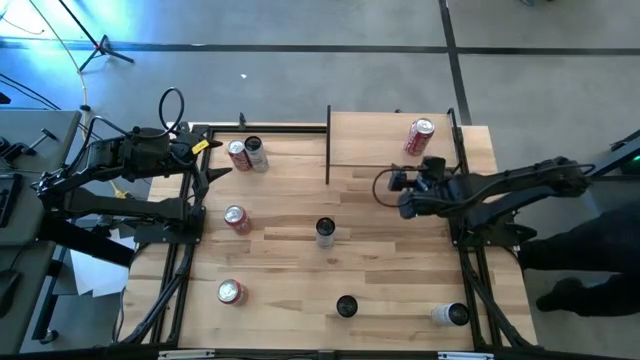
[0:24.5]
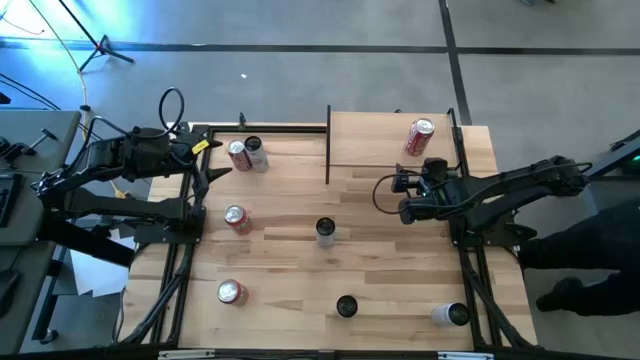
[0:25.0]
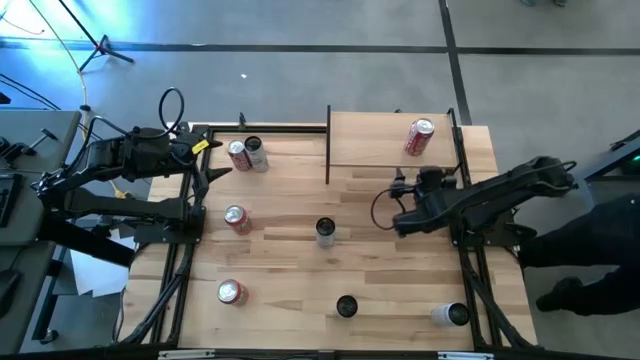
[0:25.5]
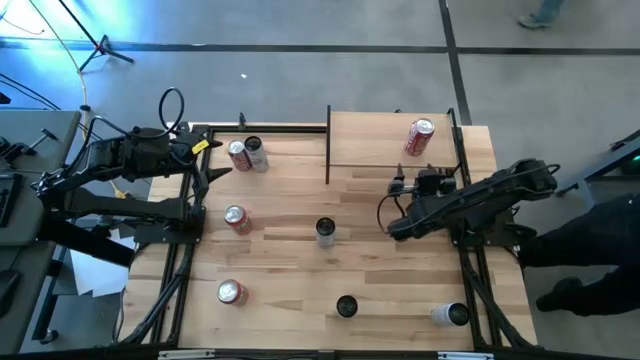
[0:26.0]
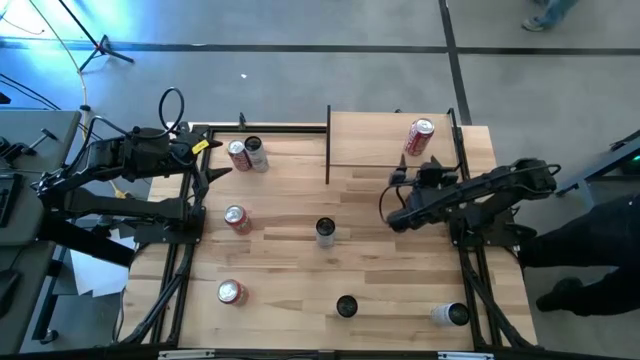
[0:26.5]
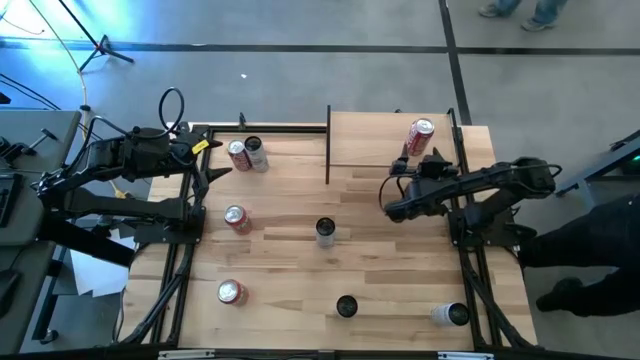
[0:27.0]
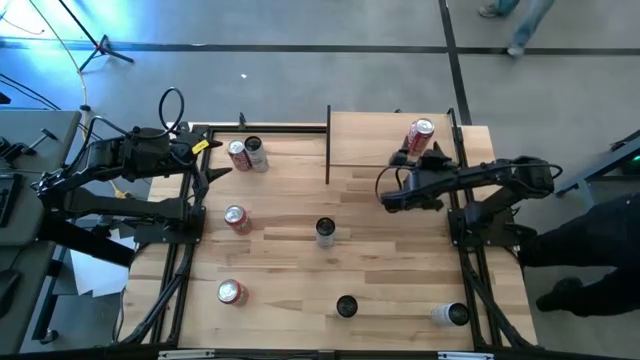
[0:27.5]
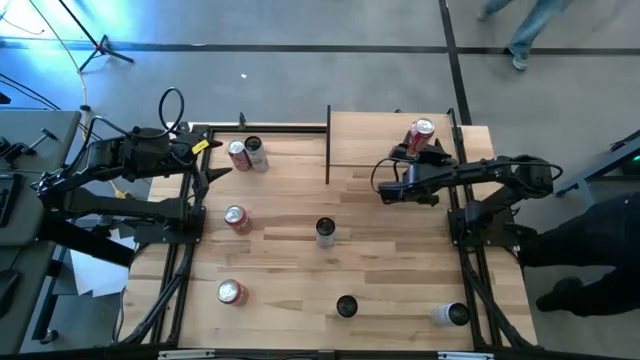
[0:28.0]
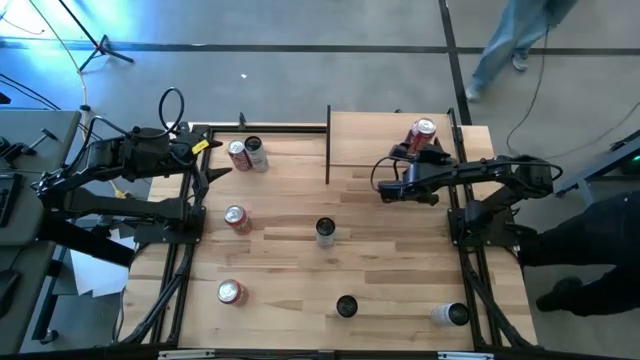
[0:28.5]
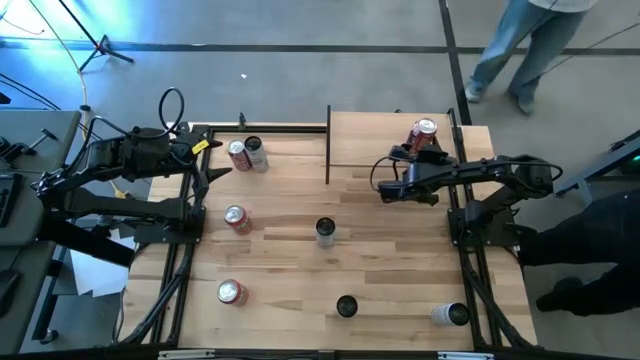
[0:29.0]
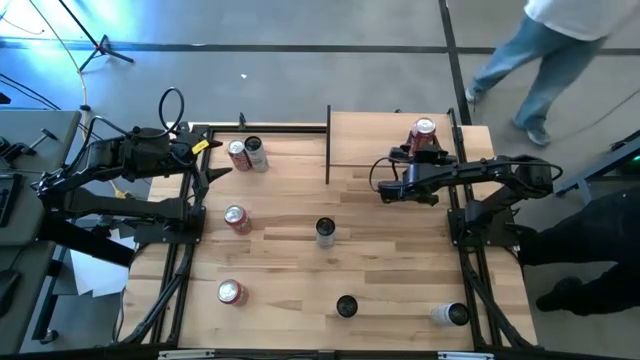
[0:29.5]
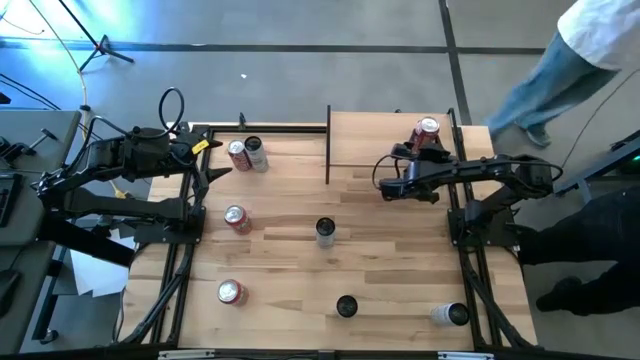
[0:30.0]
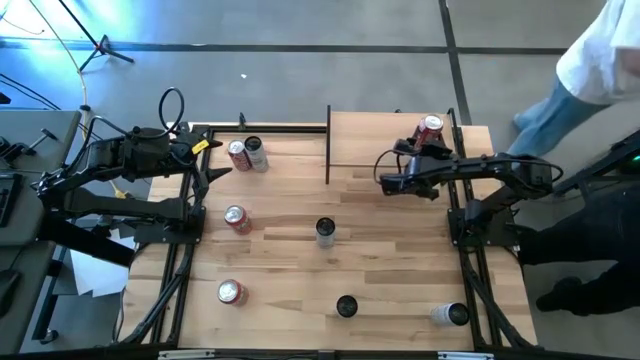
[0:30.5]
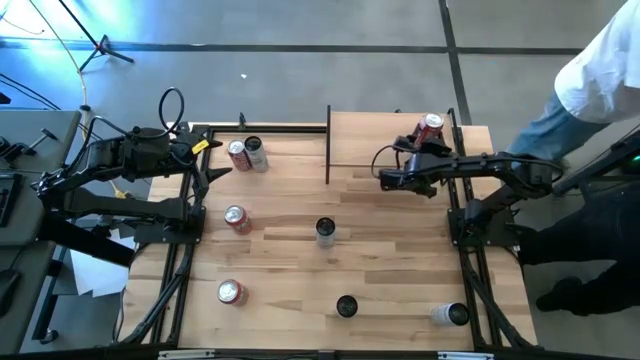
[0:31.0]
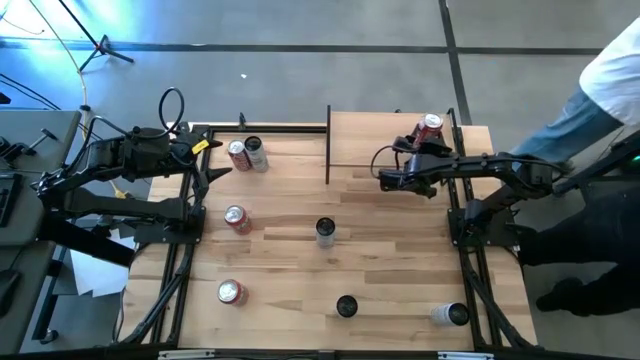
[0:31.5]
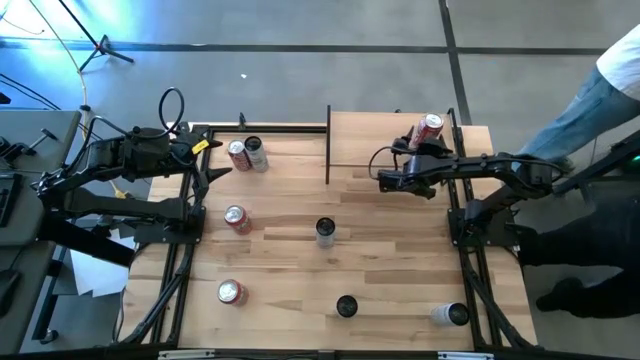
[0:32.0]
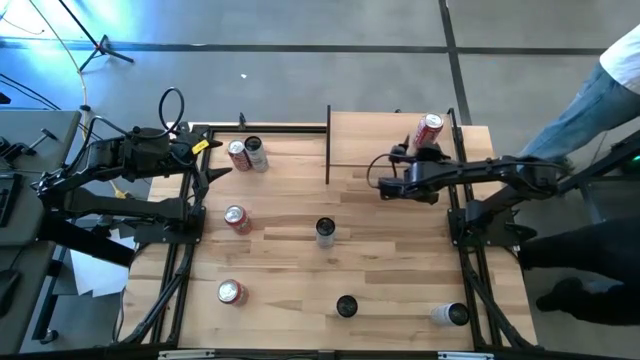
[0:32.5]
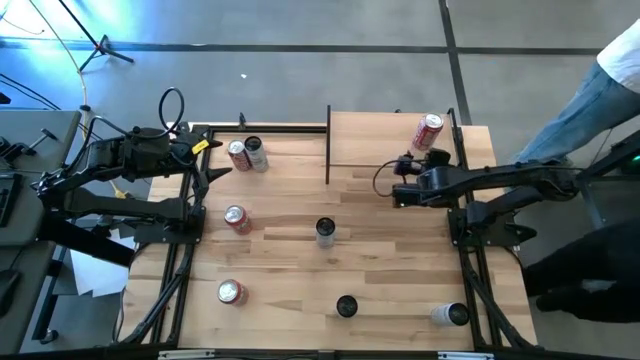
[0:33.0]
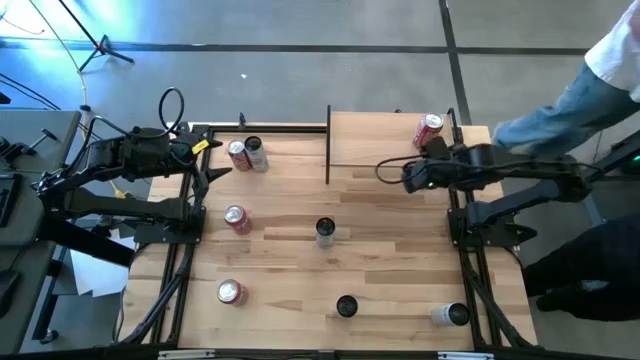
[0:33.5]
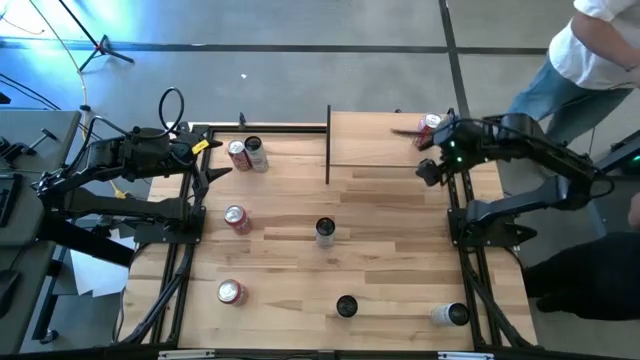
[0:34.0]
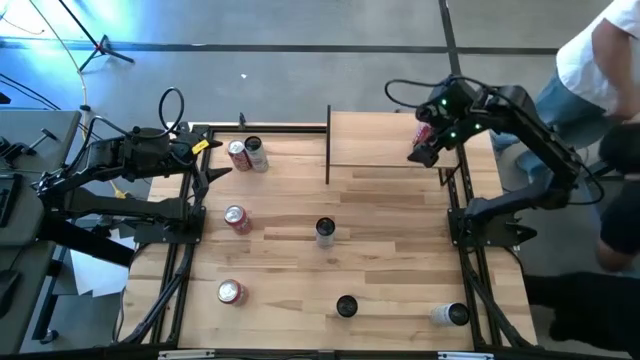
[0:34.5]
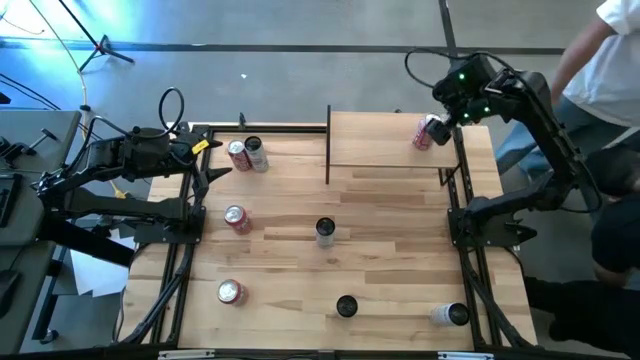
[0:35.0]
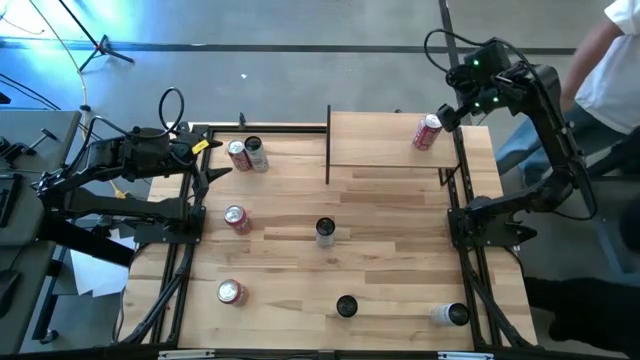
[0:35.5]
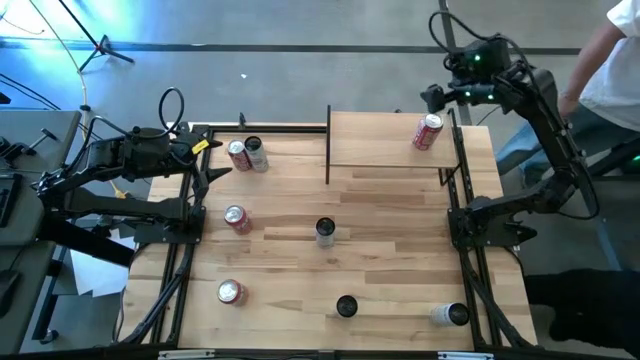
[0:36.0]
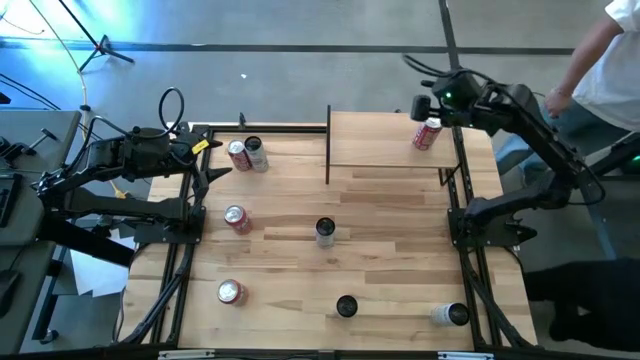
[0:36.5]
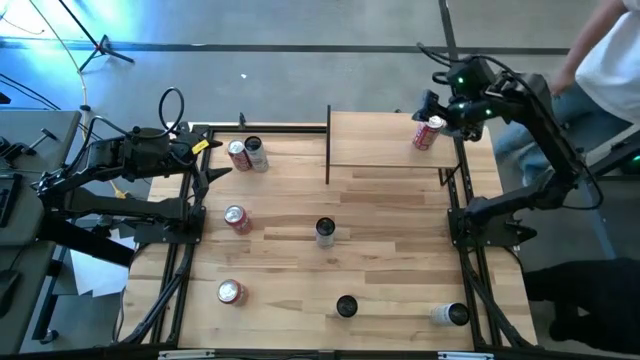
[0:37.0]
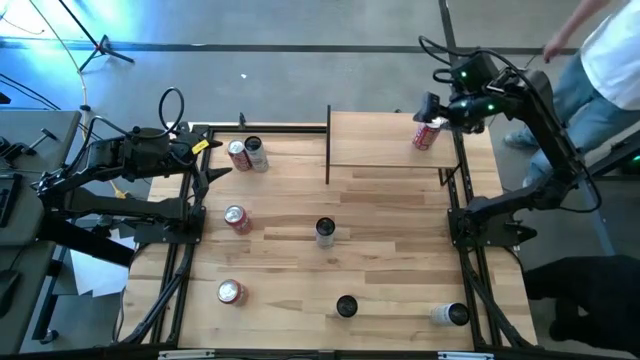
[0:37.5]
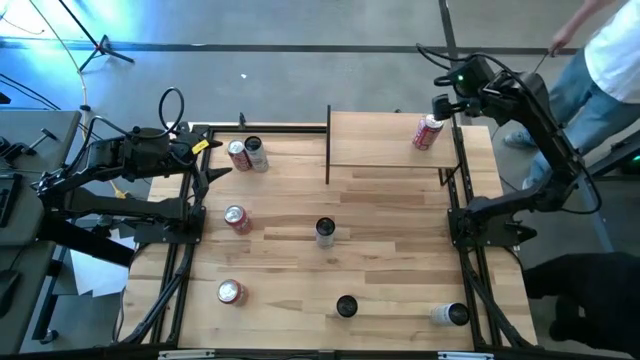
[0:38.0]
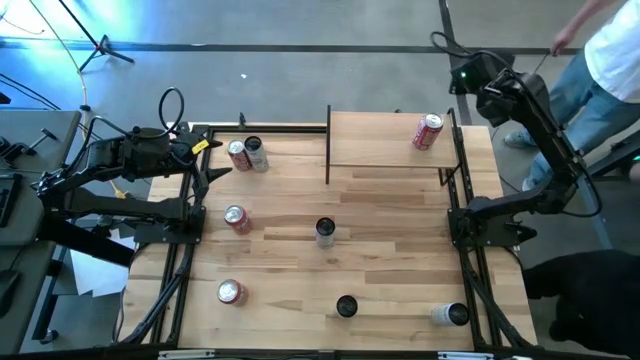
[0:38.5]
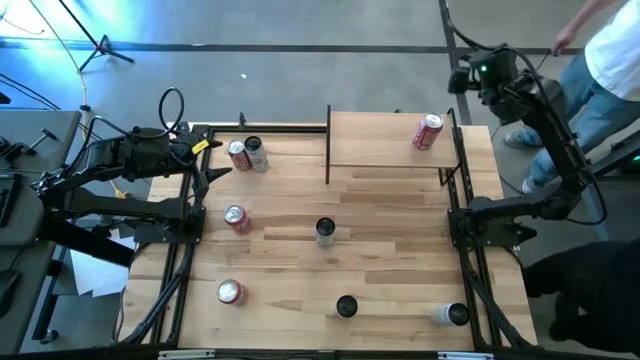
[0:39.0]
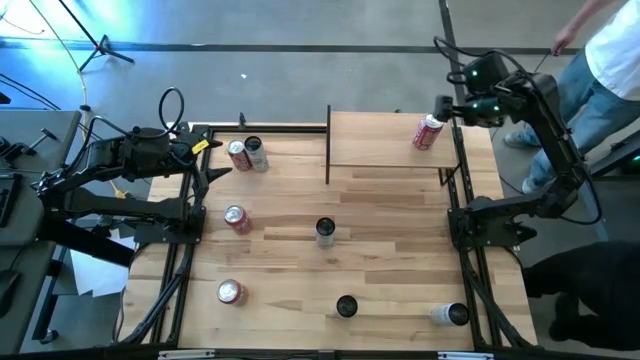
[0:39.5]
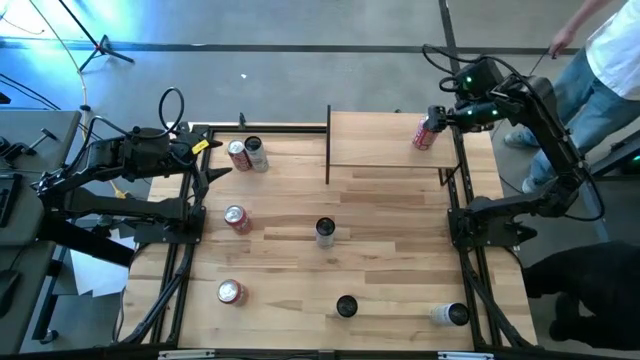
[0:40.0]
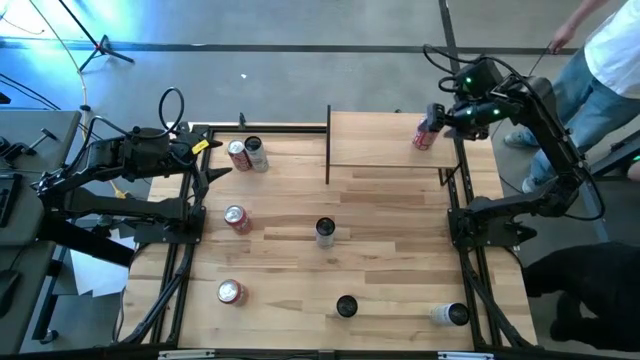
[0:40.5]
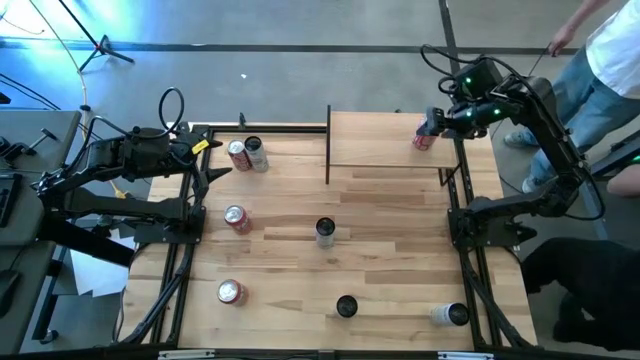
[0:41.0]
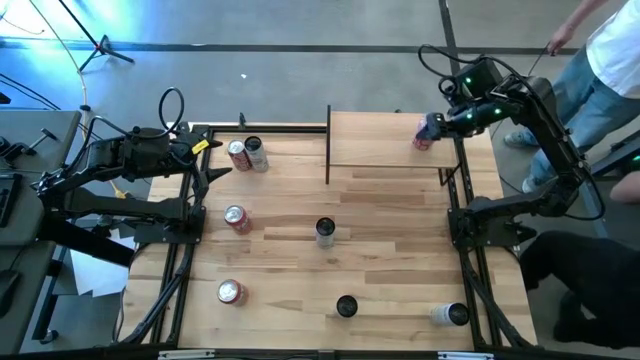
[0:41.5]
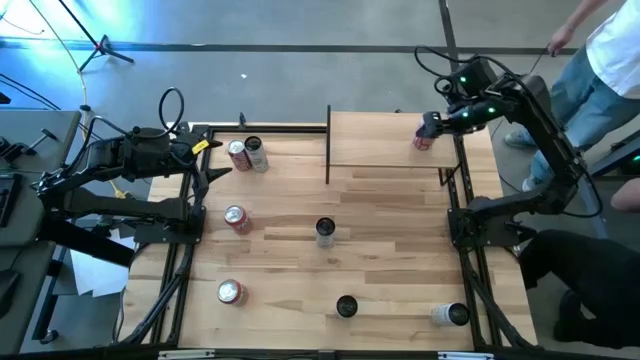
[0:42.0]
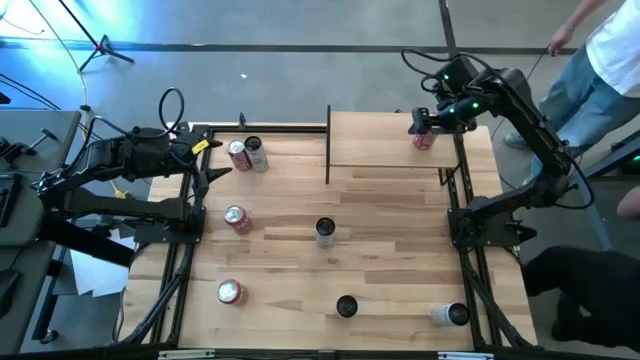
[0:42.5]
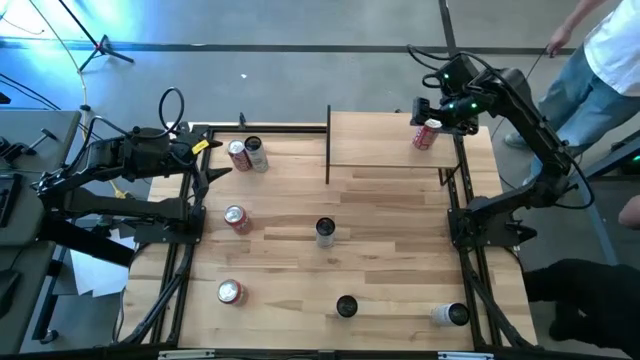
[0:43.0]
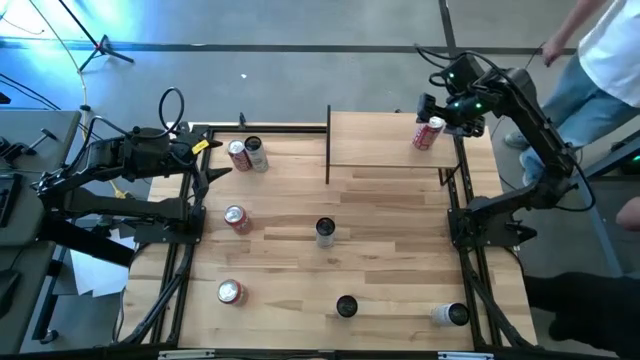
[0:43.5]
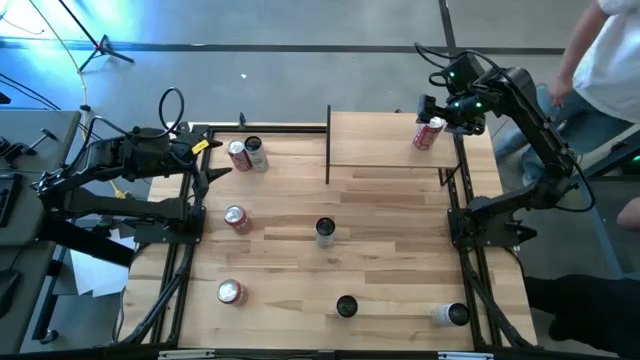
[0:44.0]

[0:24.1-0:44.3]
Task: Place canned beverage on shelf
Put the red soda can on the shelf
